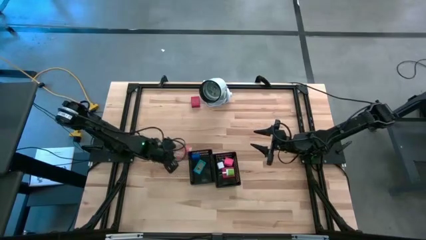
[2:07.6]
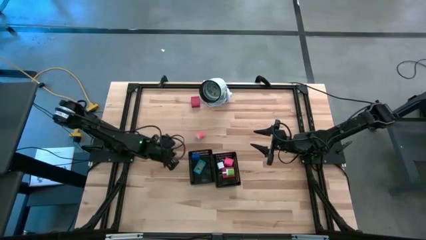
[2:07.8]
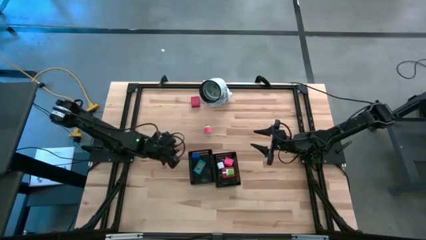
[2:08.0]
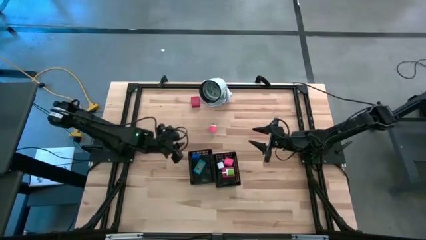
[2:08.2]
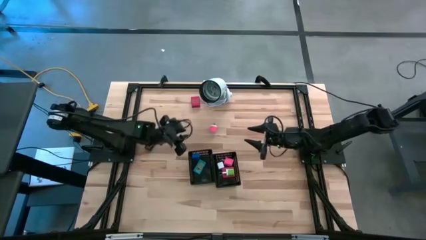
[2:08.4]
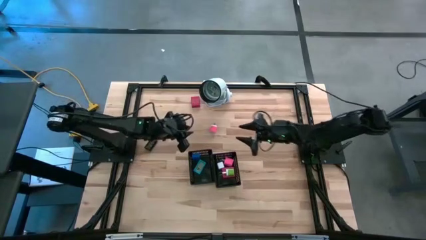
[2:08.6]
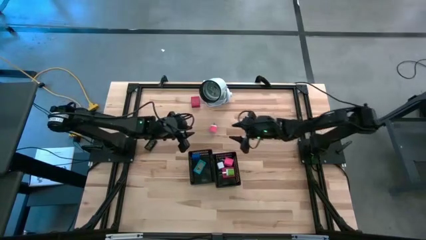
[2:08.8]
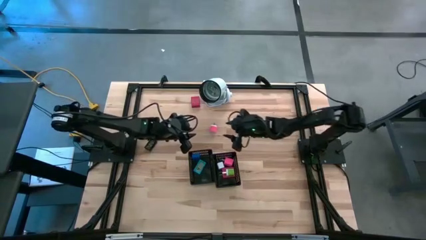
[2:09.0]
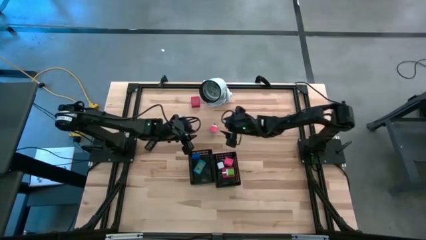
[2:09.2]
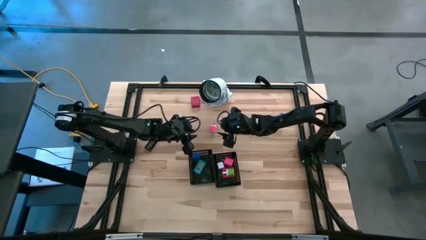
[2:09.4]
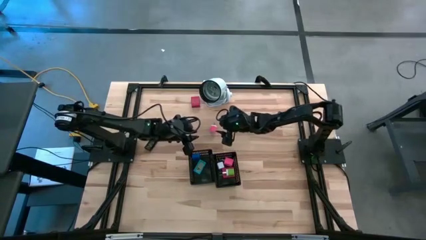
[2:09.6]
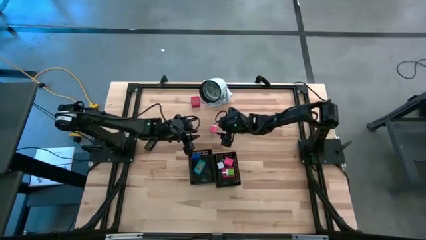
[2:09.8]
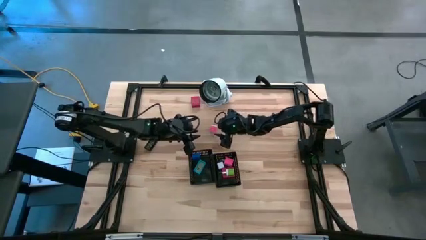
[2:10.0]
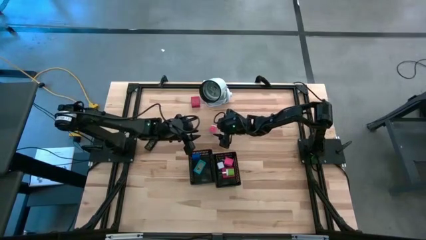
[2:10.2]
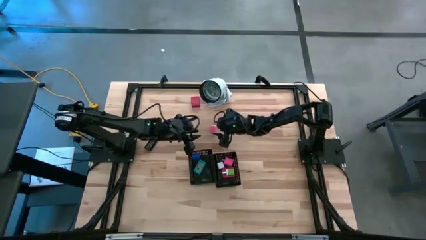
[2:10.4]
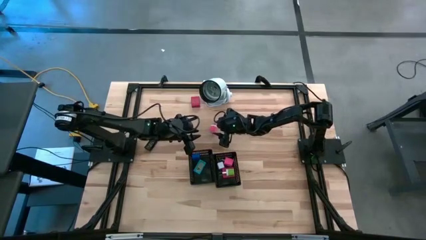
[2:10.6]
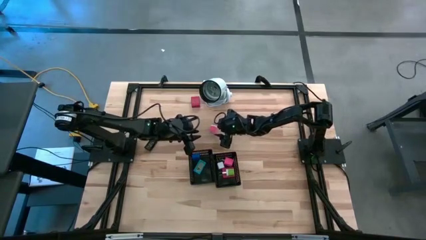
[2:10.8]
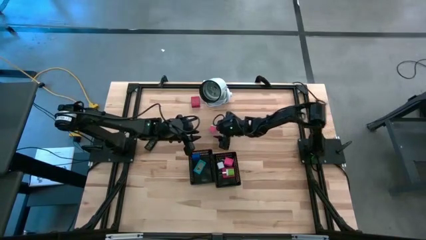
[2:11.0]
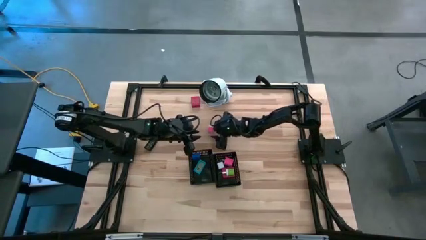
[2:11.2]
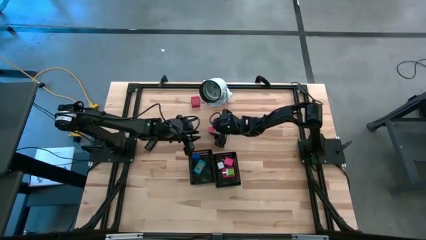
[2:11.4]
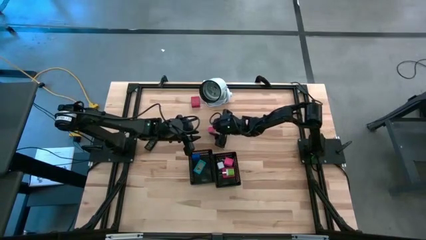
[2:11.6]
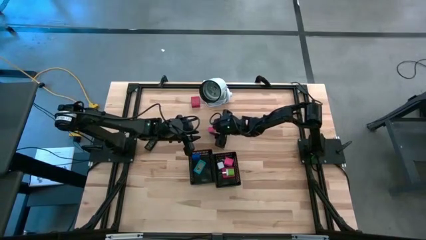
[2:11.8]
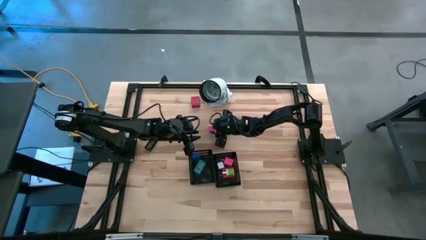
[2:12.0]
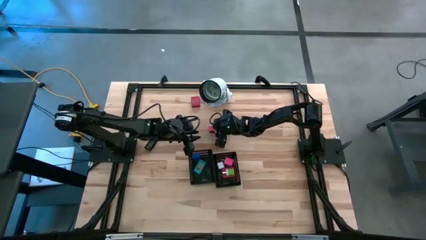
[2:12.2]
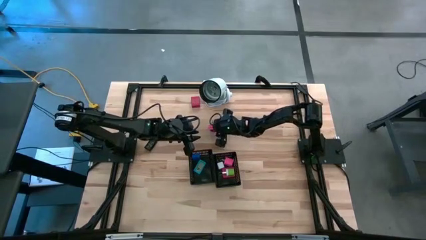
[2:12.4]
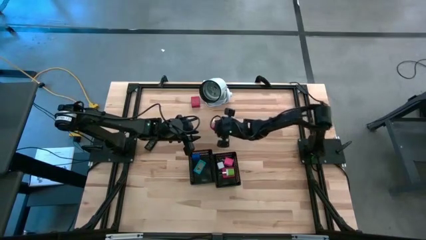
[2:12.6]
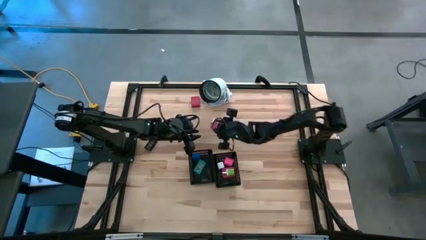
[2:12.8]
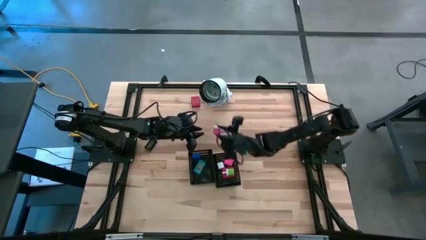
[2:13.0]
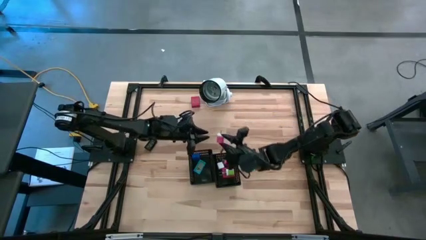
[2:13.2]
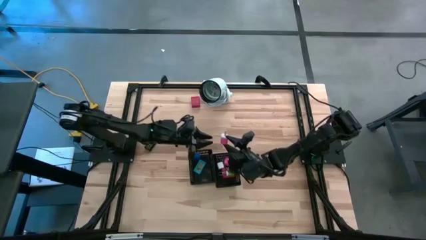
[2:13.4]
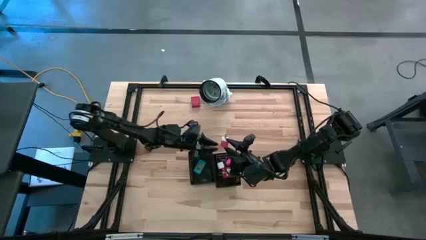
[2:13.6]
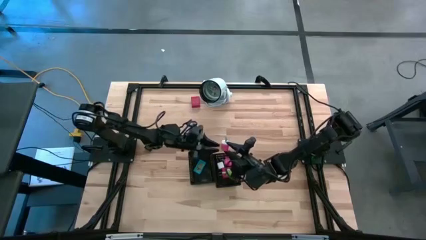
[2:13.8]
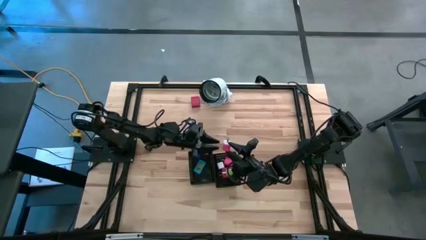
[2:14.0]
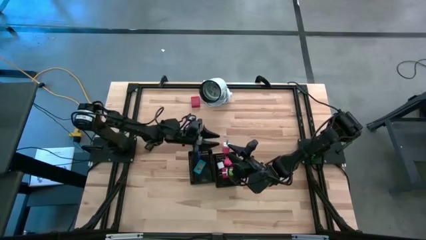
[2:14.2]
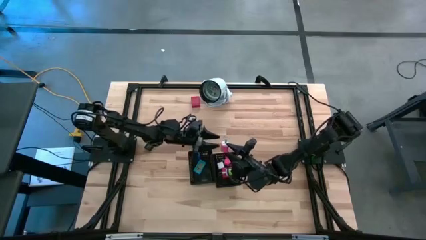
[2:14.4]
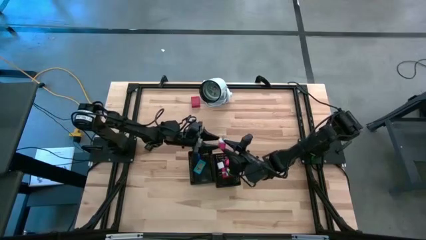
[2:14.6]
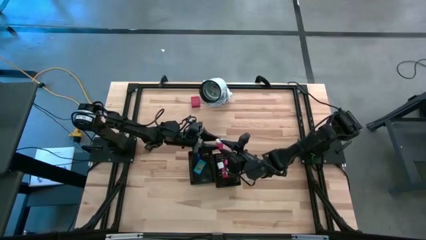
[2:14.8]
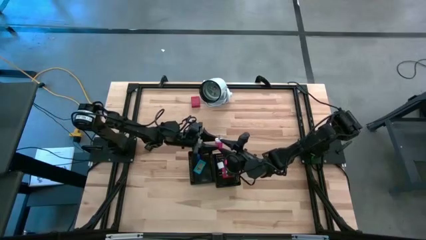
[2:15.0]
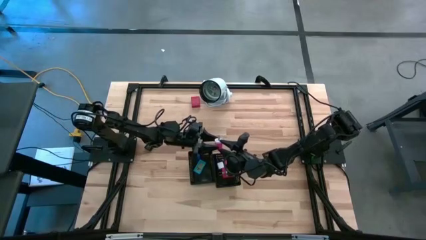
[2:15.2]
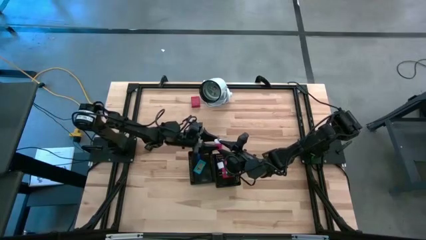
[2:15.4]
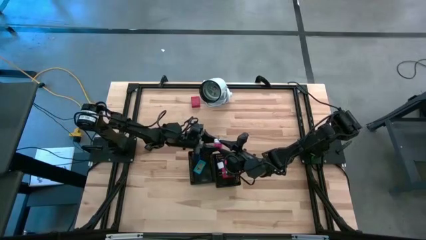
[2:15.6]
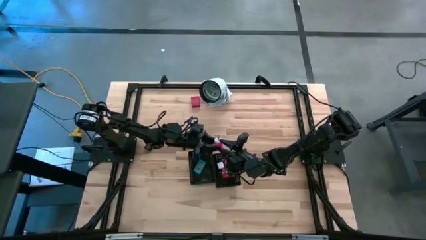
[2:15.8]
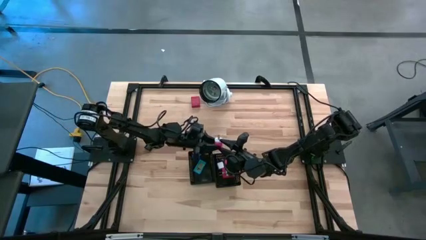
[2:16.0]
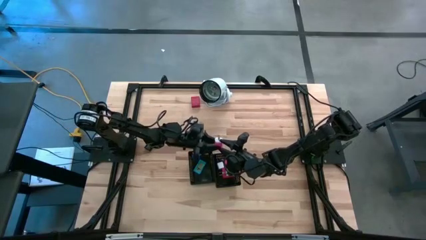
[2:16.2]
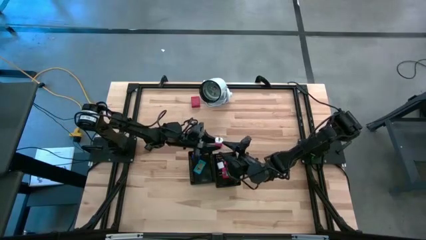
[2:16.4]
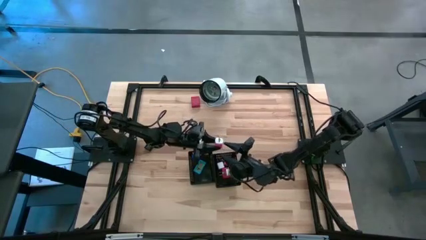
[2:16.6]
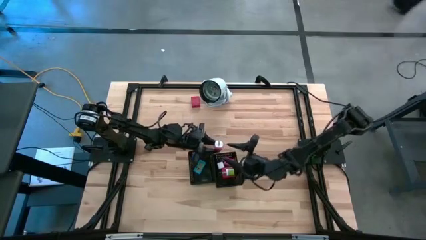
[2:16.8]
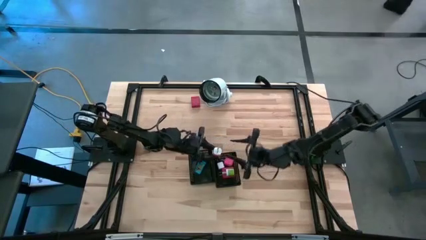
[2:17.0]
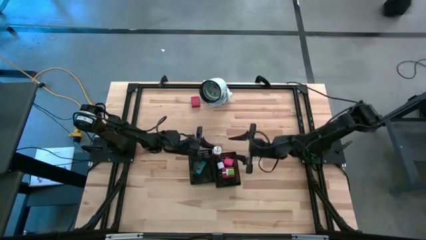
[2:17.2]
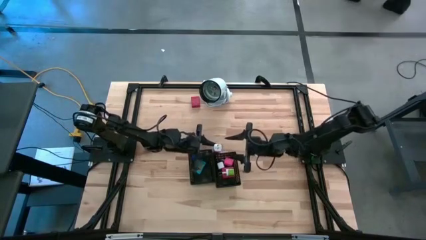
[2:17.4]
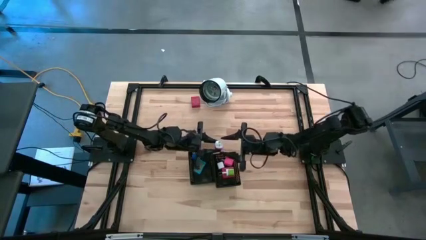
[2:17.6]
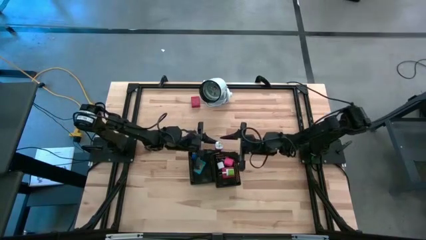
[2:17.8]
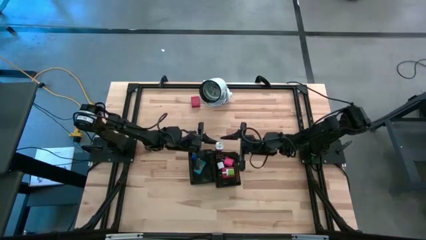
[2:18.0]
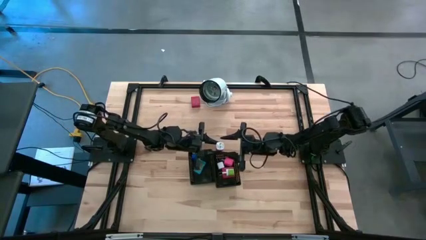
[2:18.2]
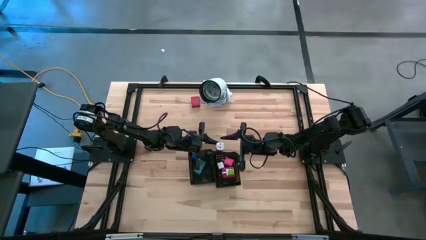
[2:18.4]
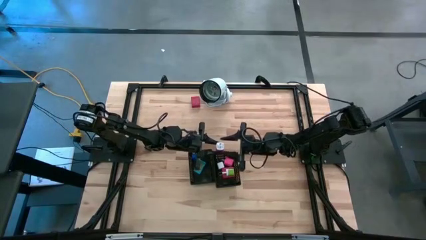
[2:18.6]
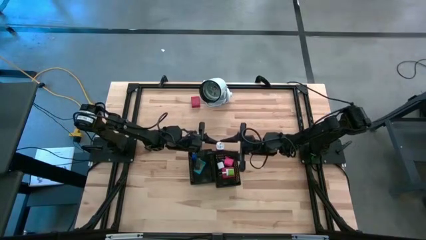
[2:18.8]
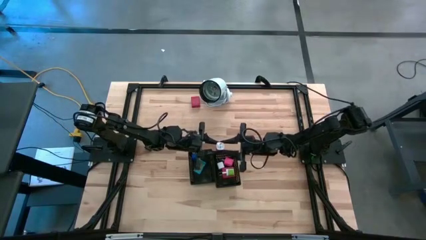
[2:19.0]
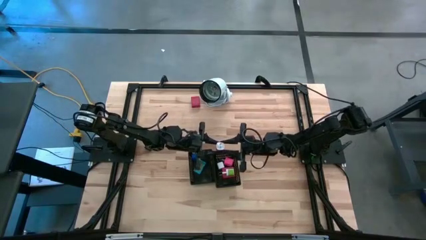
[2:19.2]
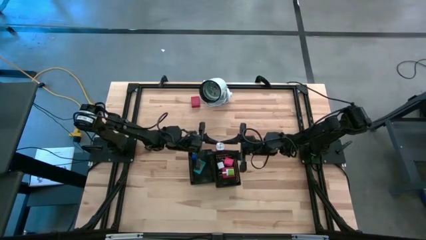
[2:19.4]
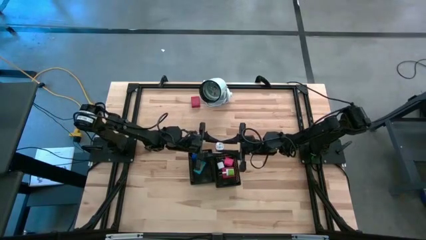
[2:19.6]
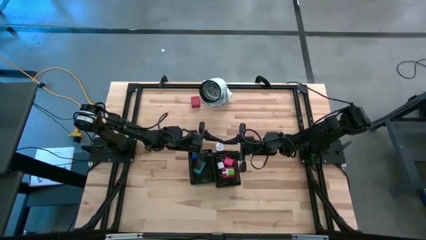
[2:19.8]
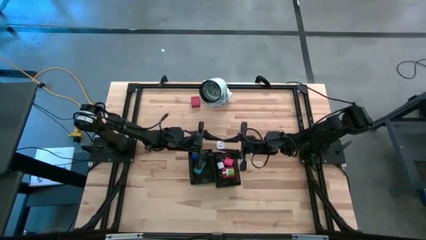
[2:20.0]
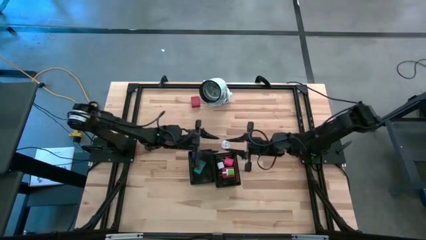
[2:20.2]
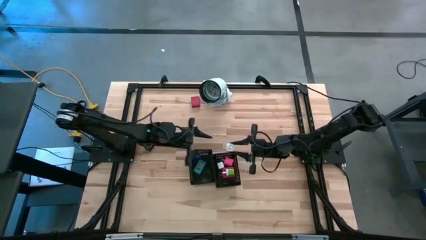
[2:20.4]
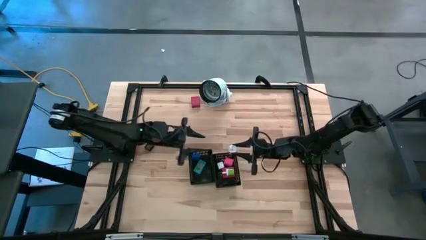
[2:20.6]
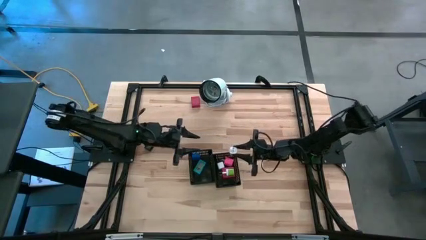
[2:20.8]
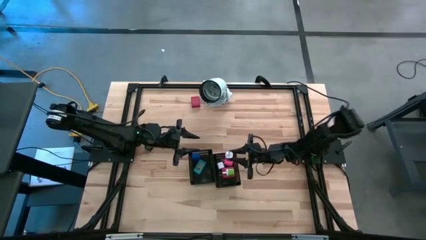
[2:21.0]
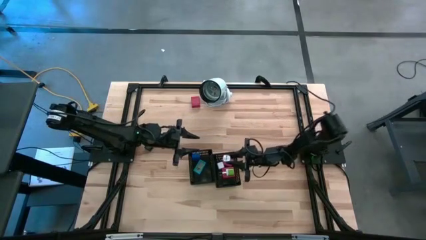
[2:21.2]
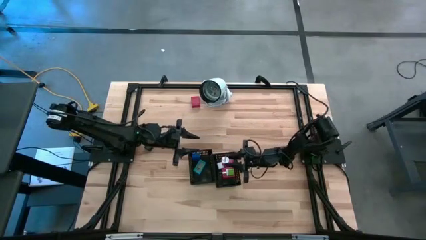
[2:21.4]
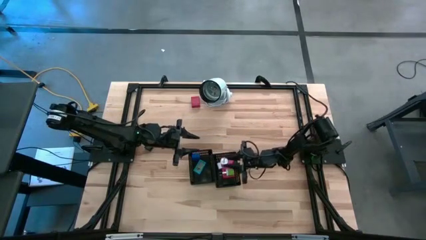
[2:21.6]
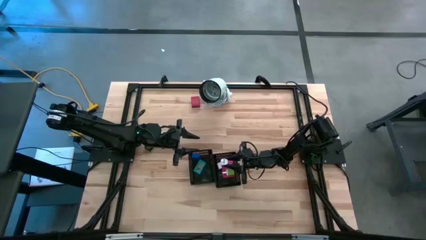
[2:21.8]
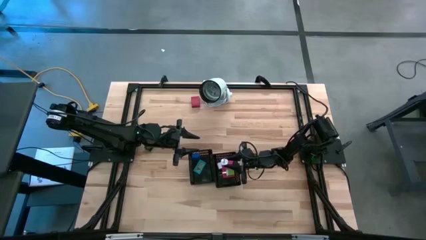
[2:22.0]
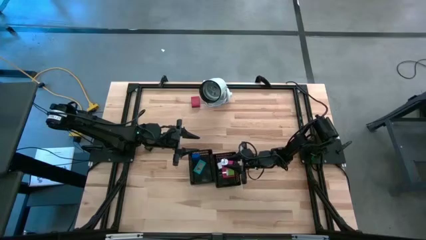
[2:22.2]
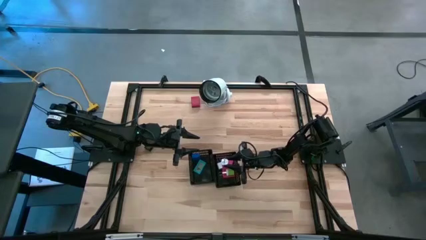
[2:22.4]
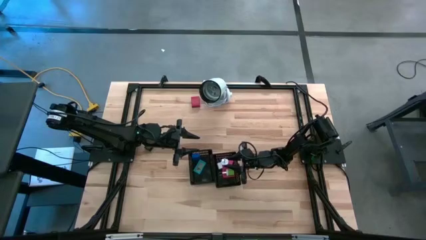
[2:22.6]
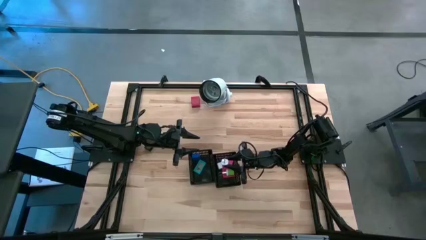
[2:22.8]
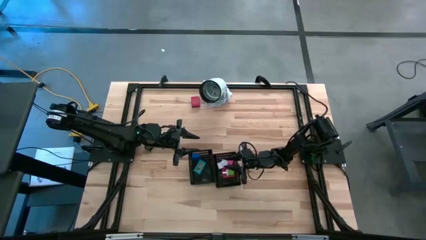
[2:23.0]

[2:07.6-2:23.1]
Task: Pick & Place Office items
Put the pink and white charger adapter into the right black bin
